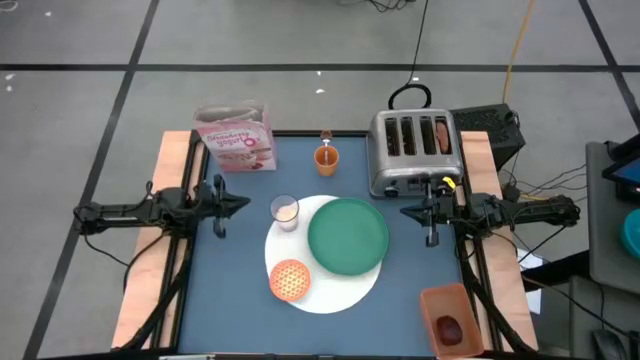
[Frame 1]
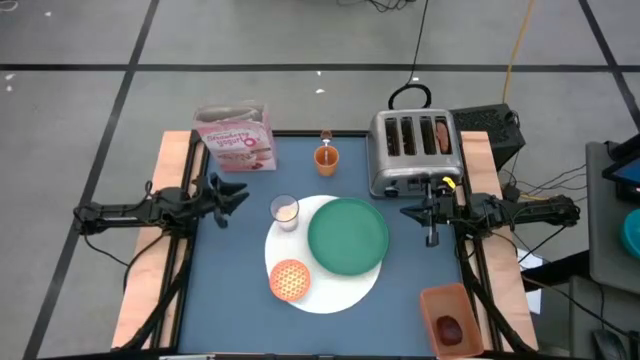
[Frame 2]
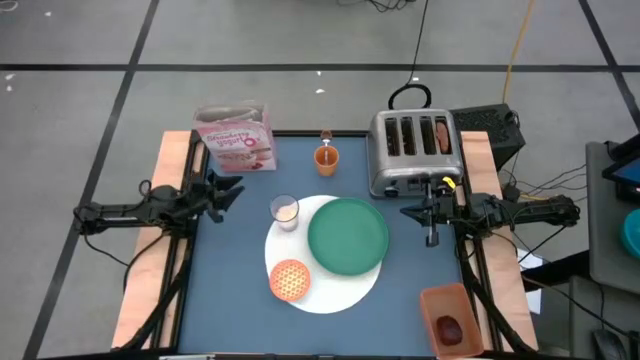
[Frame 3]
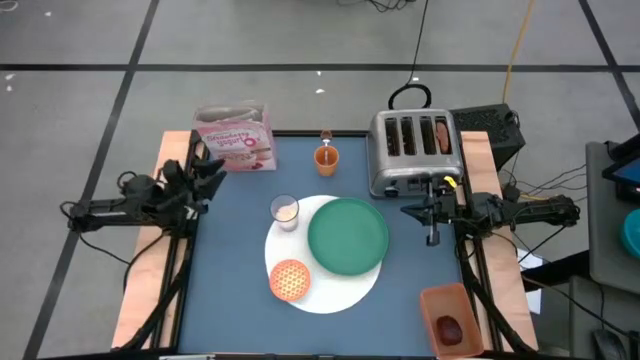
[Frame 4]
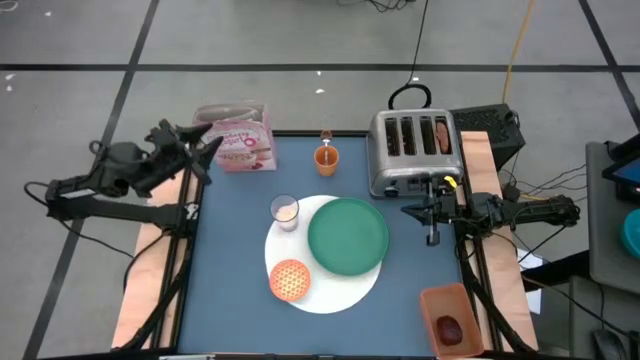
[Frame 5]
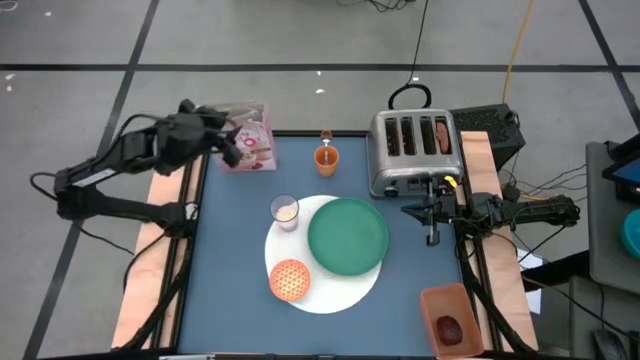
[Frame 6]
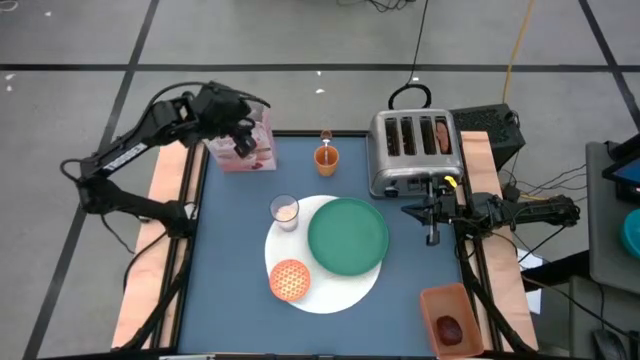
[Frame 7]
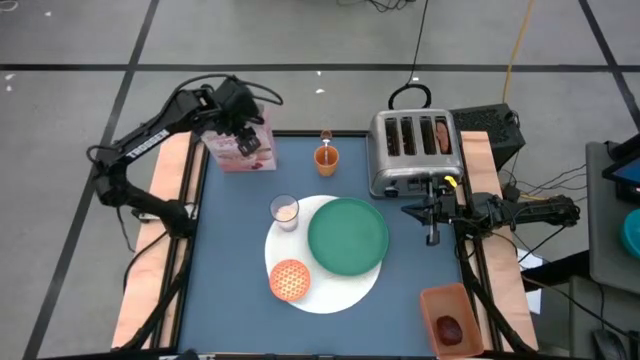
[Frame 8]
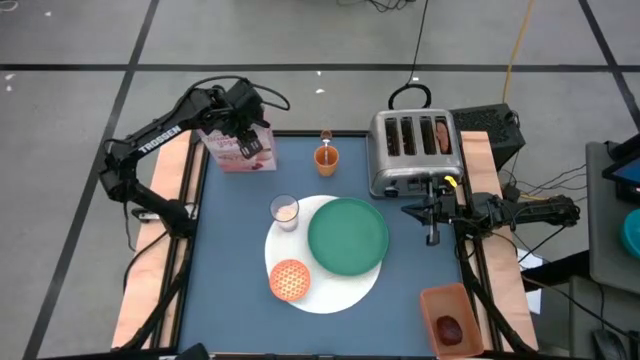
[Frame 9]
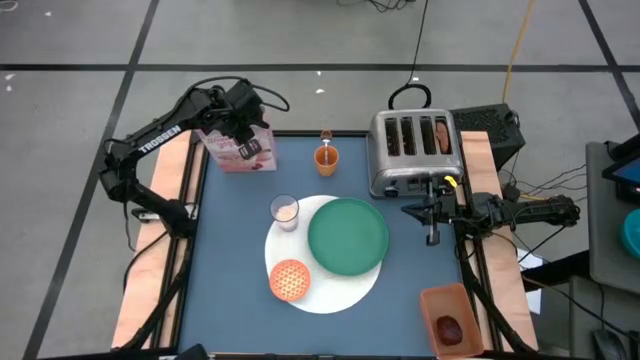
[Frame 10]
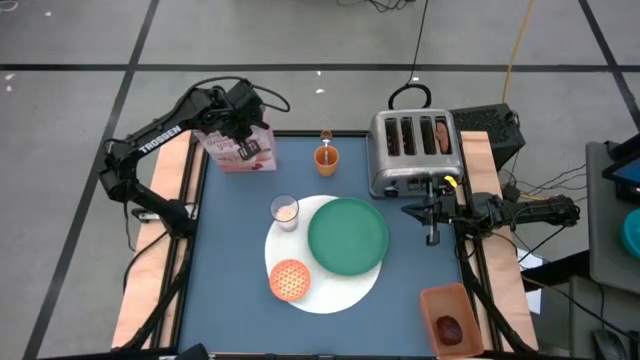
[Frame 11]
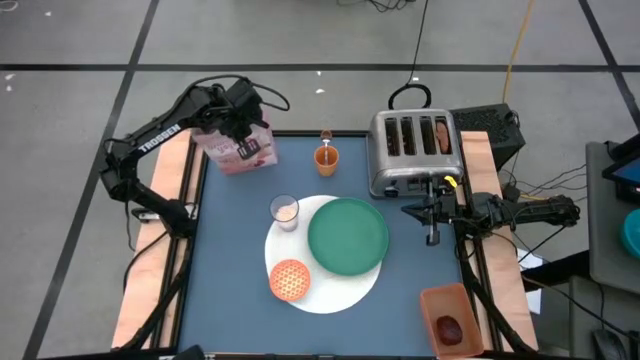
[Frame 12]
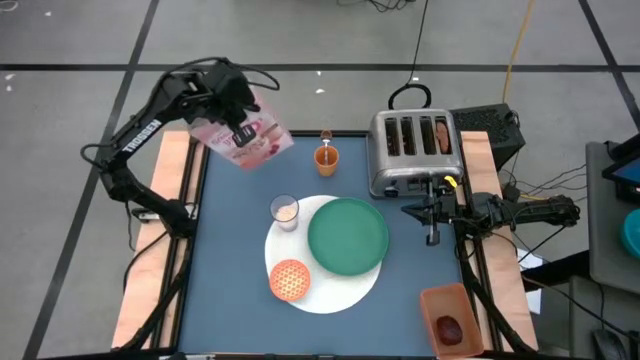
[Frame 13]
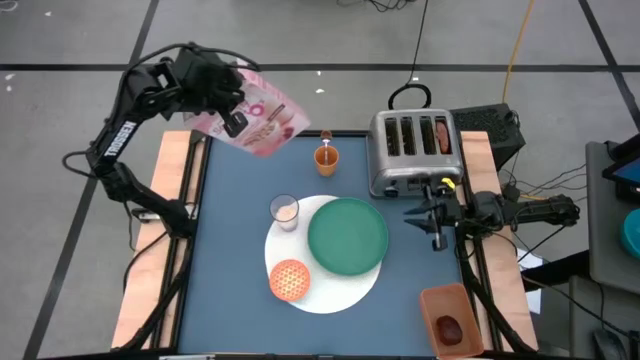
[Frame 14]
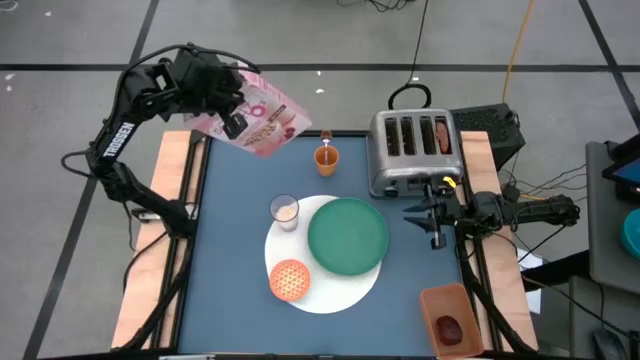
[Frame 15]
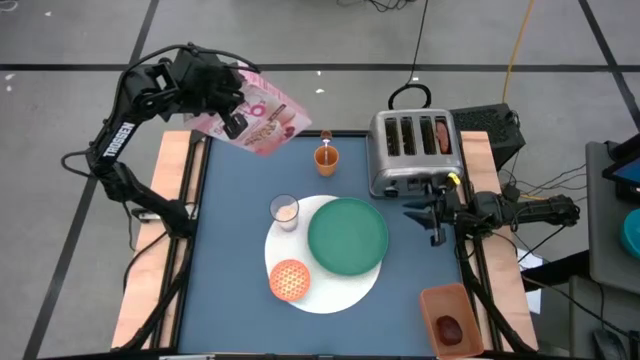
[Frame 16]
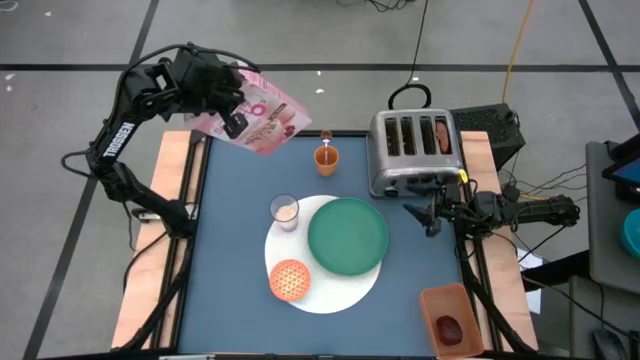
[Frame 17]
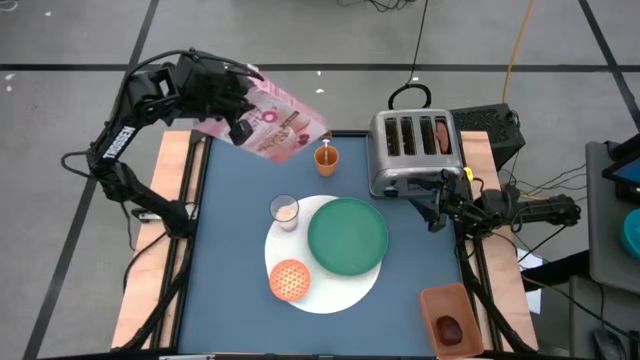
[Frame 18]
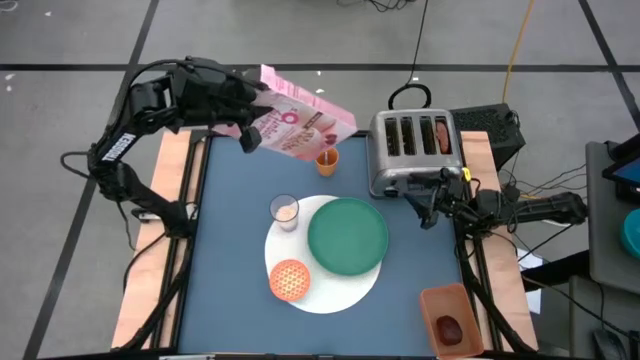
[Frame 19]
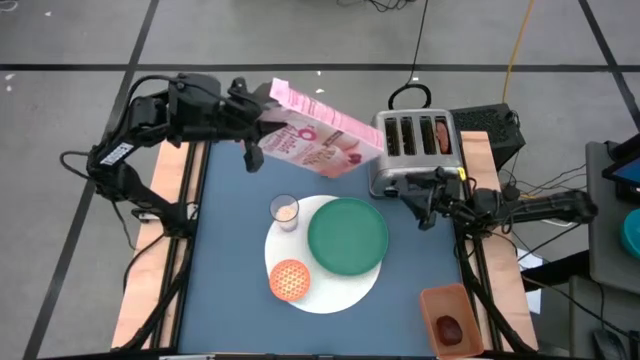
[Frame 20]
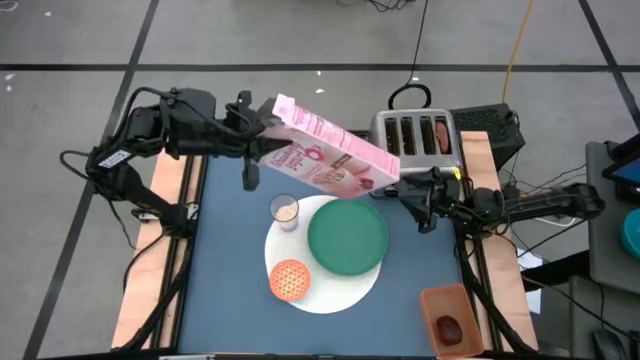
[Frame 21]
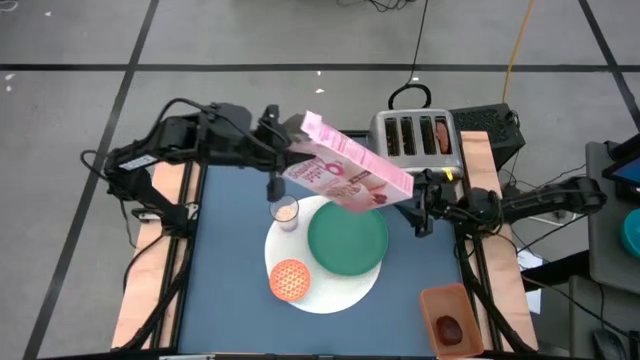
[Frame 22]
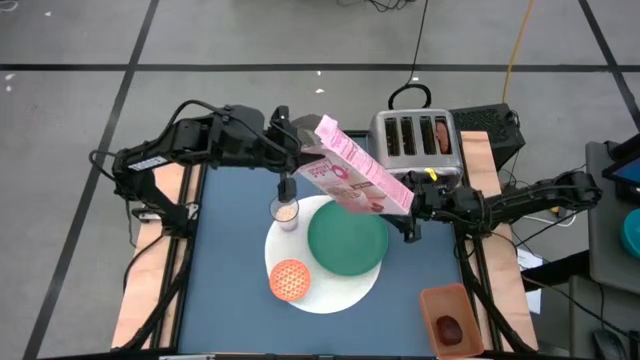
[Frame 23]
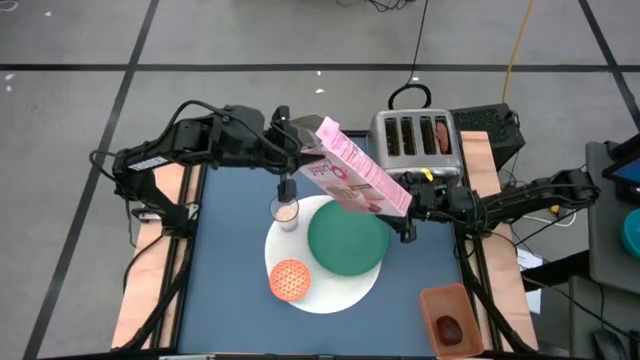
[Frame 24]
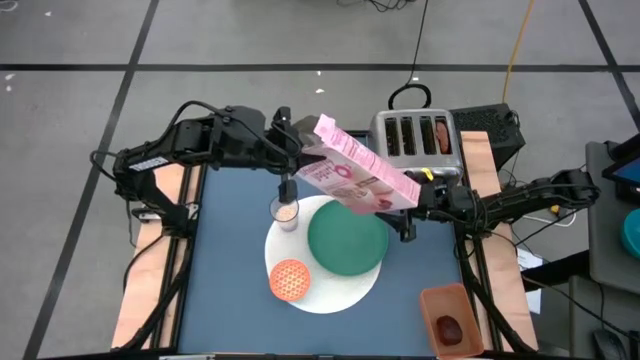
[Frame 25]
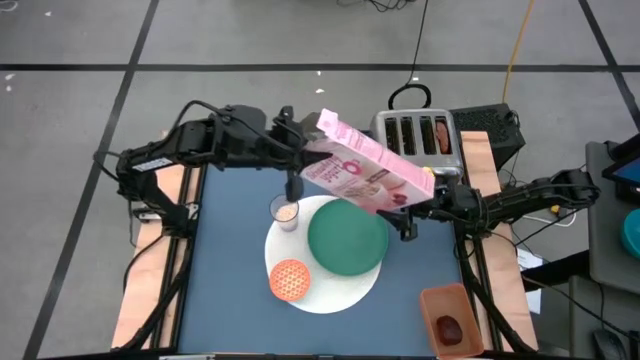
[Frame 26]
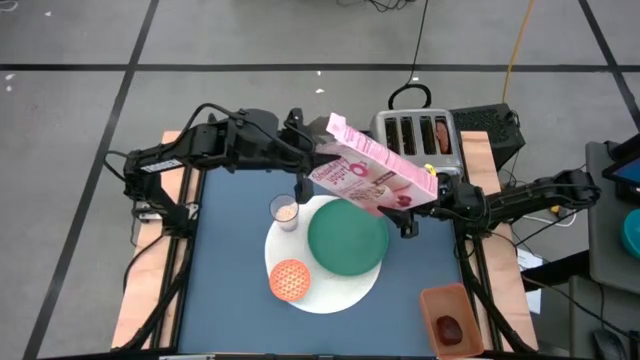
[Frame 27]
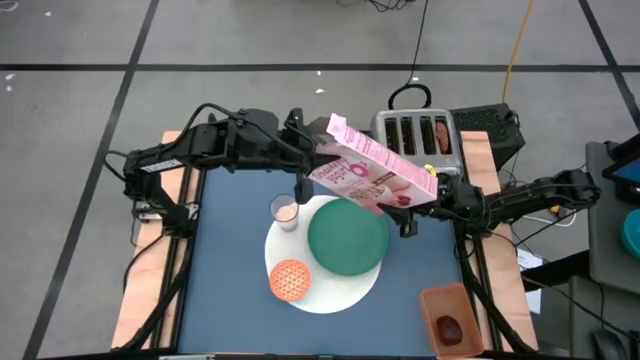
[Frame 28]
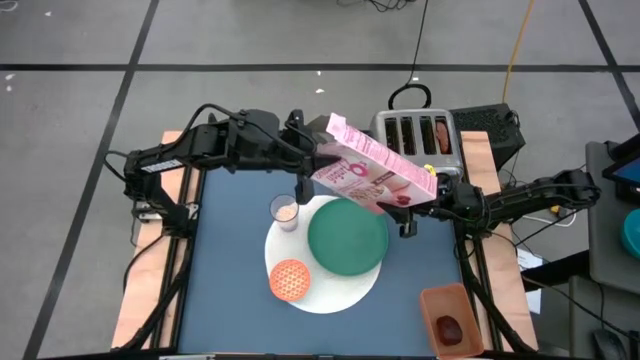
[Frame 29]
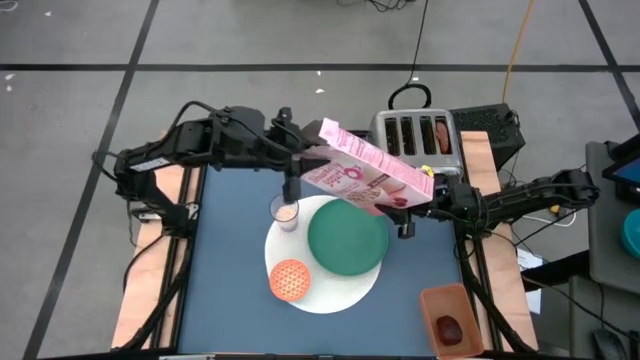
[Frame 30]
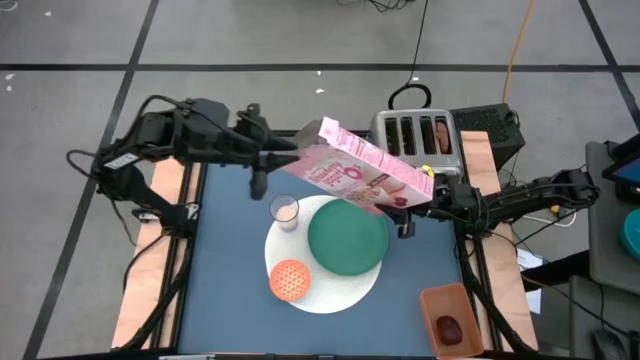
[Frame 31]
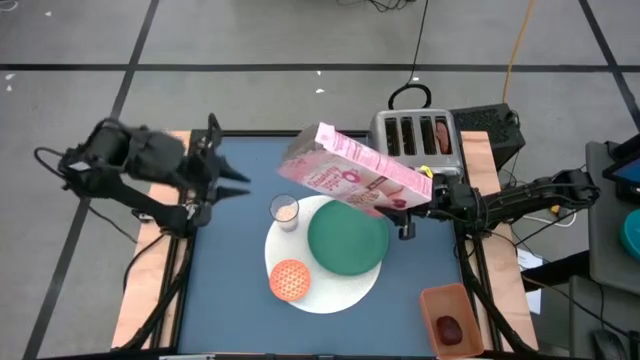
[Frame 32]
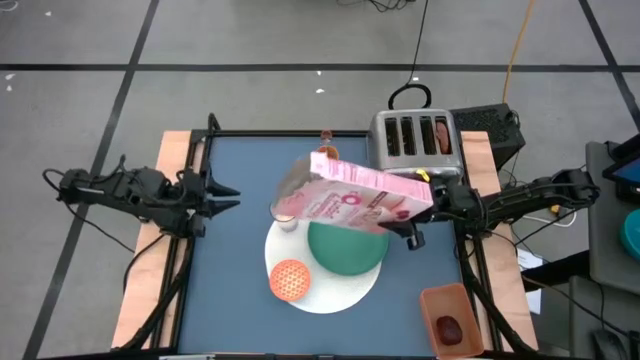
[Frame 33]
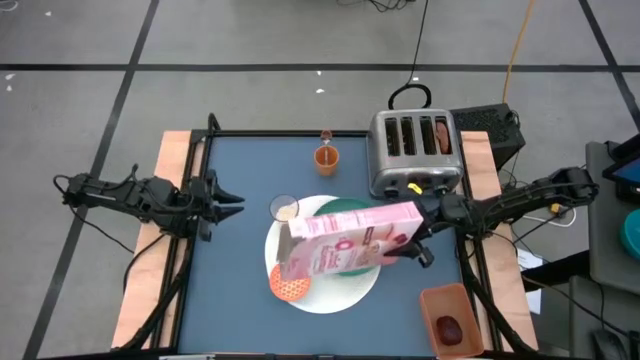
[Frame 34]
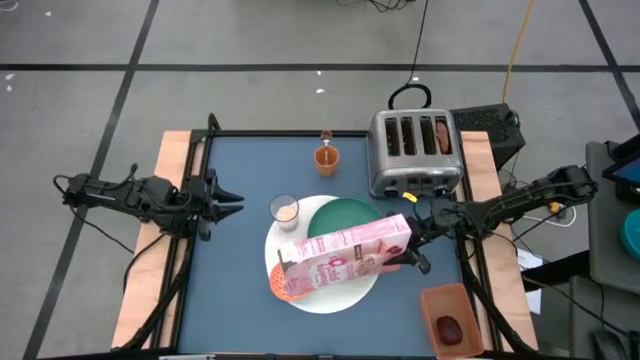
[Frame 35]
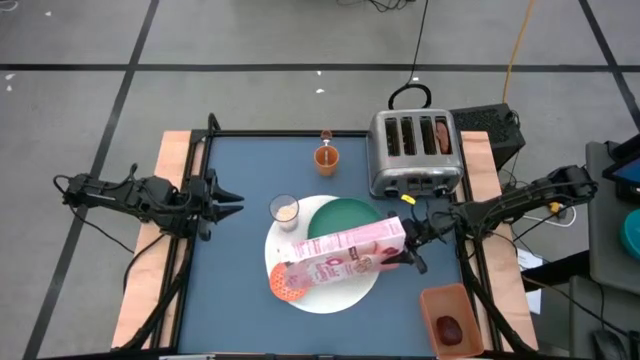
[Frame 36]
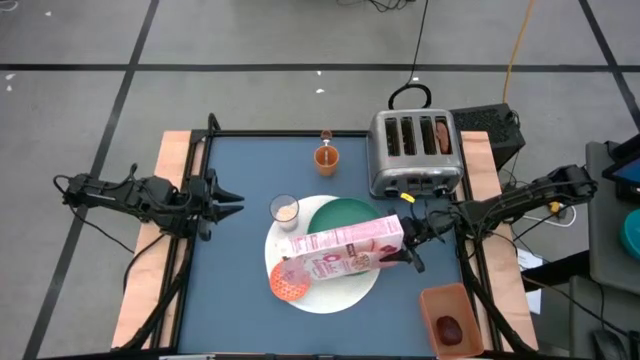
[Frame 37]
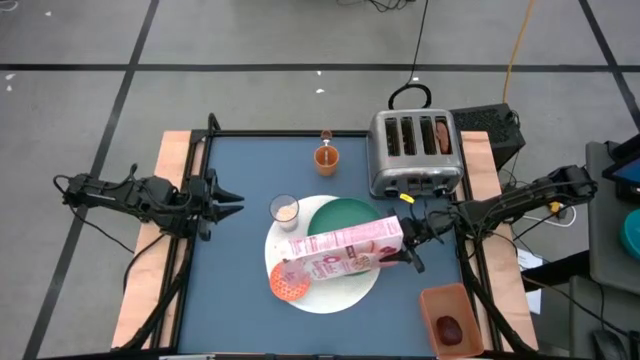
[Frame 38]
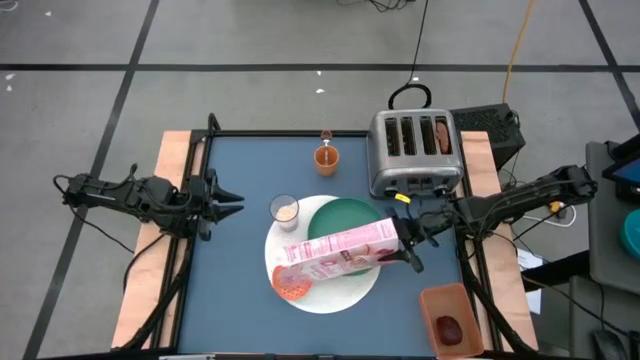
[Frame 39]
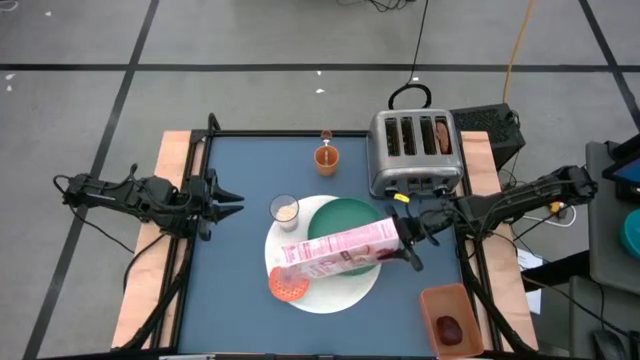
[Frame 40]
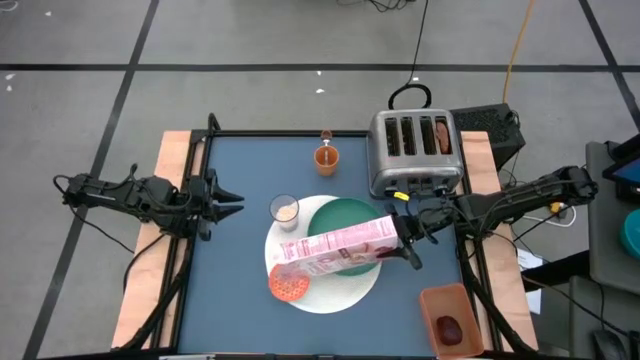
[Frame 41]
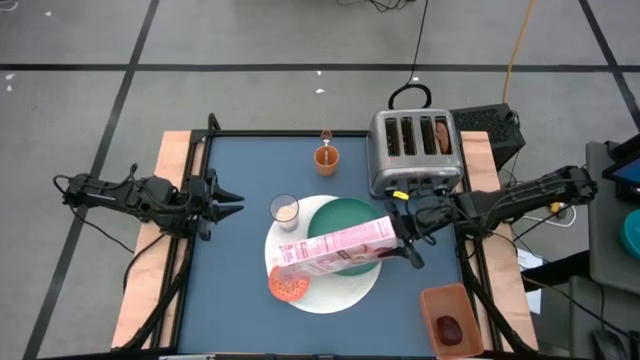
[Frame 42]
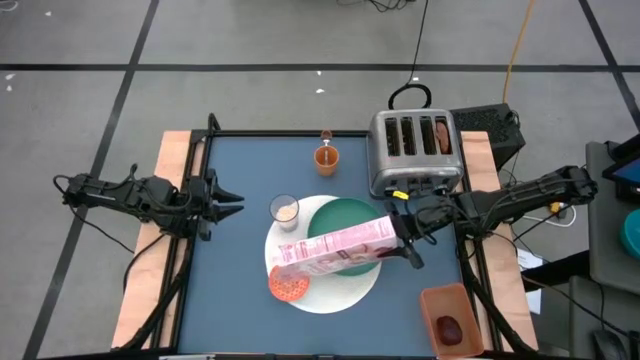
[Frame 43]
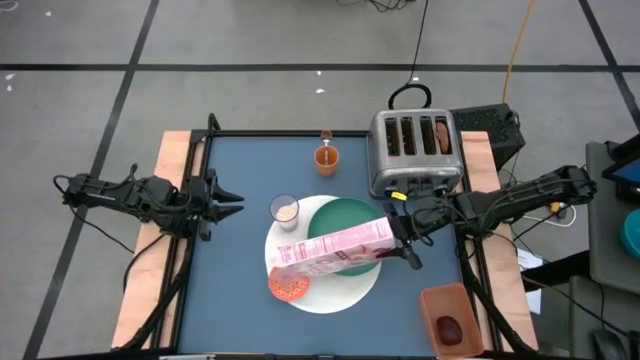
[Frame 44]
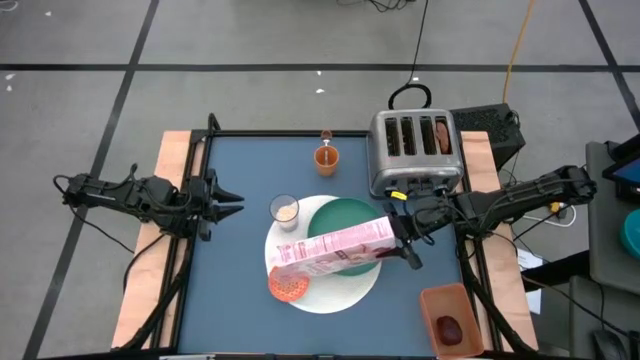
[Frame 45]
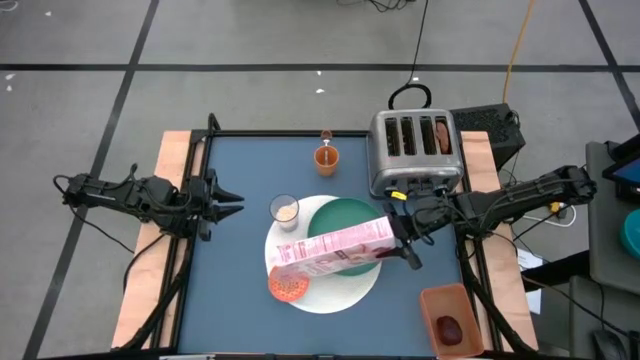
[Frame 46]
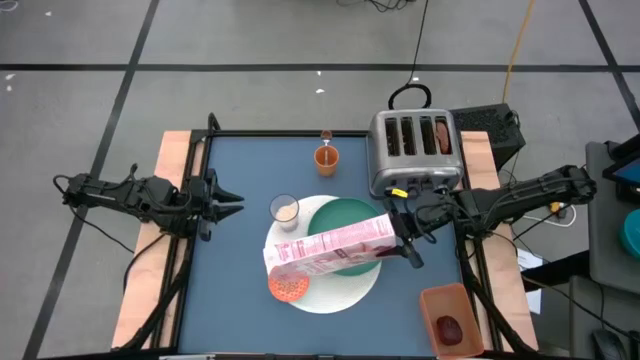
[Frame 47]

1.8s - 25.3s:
Task: Arrange a breakfast setting
Pour the cereal into the orange patterned bowl
